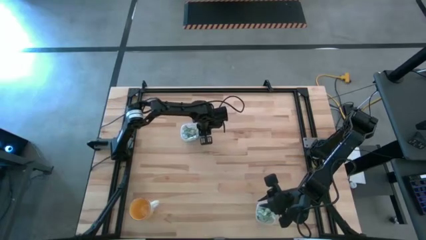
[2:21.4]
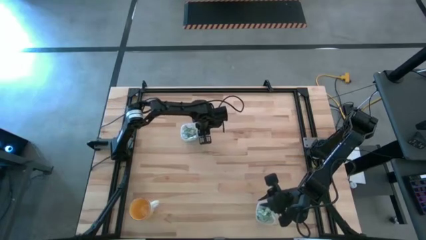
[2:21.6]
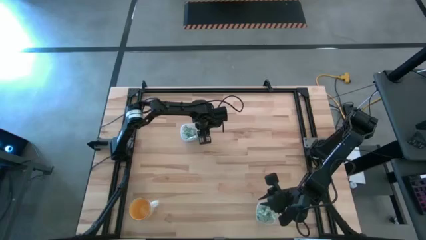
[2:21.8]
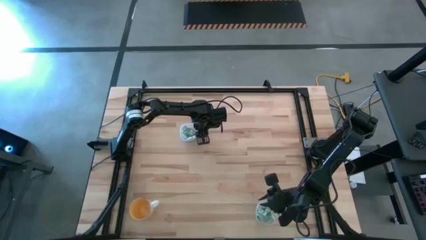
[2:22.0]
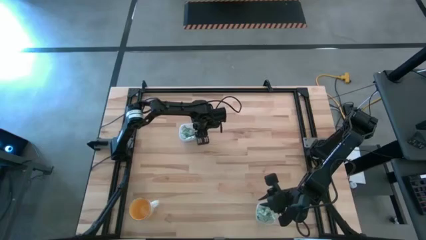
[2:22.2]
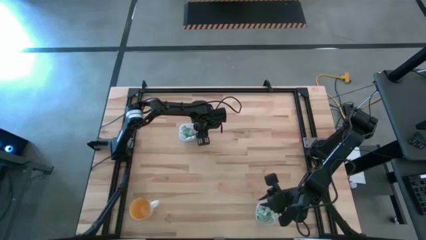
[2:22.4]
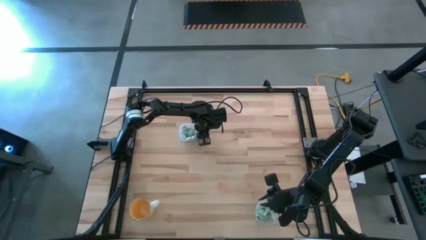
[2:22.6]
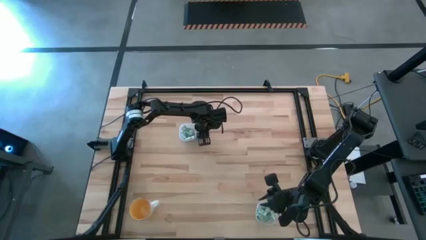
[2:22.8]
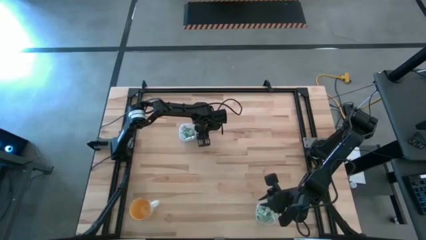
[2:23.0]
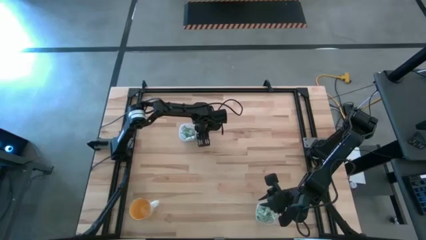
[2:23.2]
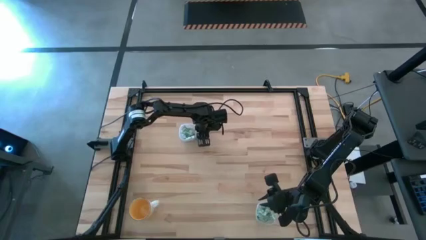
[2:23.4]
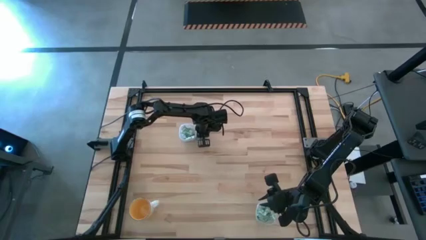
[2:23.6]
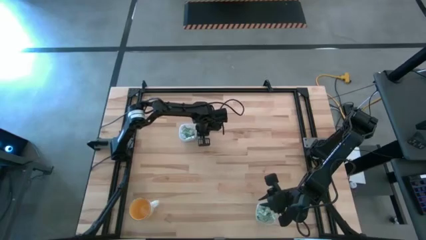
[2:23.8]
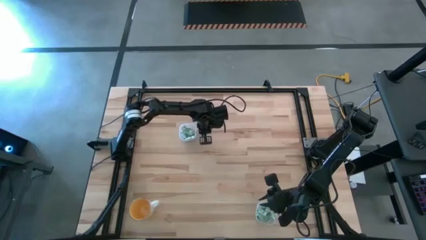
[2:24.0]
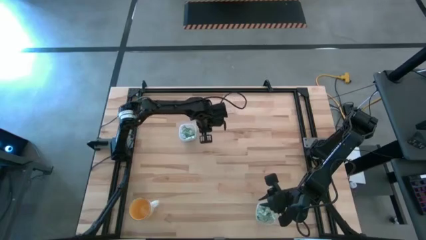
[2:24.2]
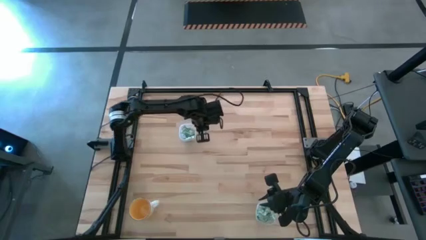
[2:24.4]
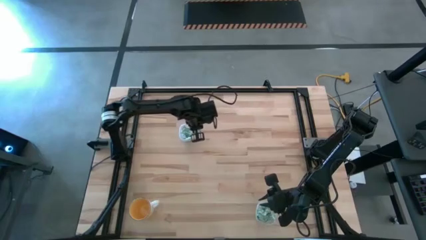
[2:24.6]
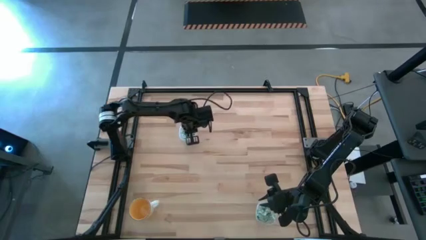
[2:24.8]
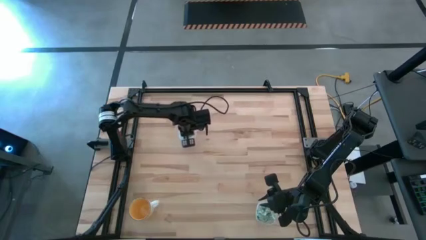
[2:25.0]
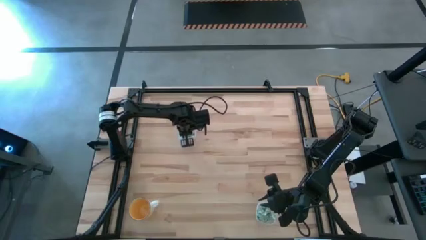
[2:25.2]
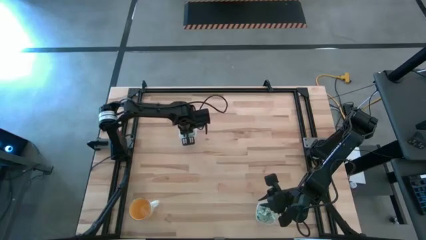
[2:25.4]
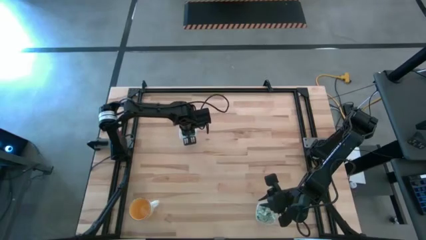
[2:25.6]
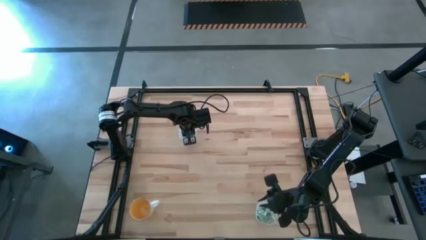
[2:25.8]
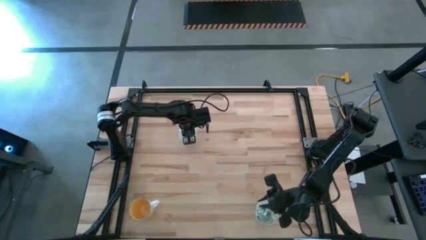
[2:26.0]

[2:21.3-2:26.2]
Task: Pick and place Stevia / Truvia into bins
Put the stevia packet into the top transparent container

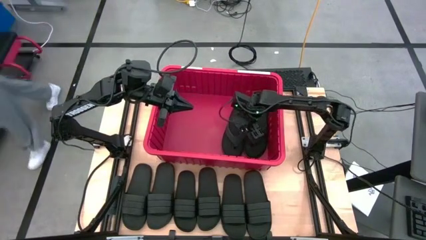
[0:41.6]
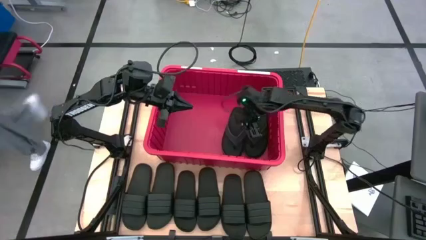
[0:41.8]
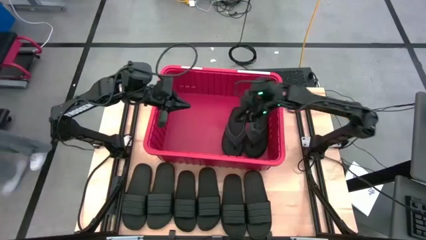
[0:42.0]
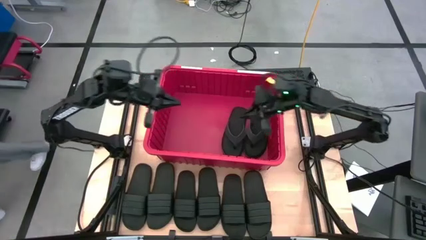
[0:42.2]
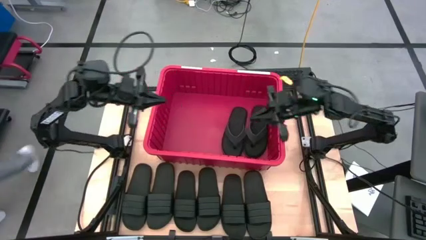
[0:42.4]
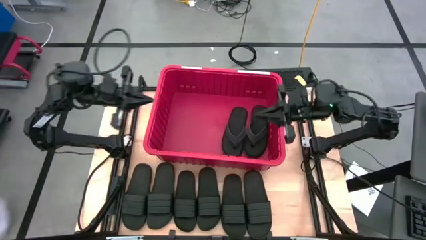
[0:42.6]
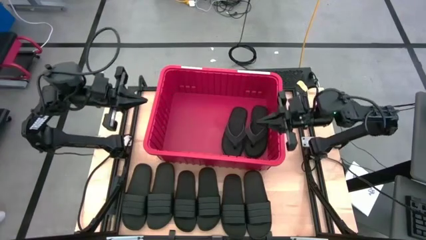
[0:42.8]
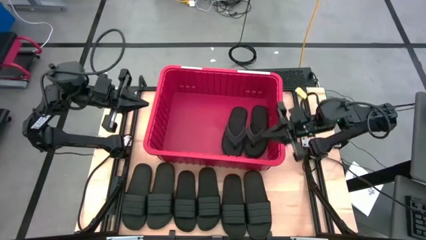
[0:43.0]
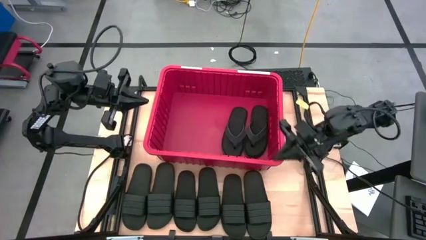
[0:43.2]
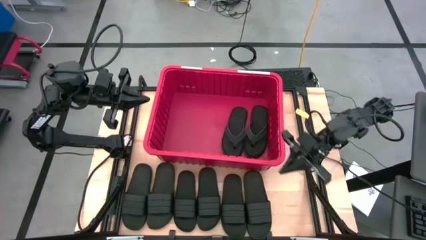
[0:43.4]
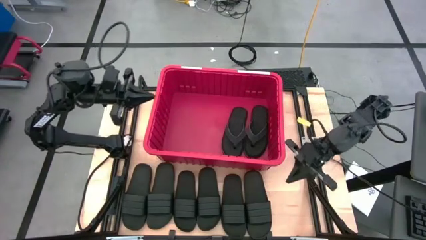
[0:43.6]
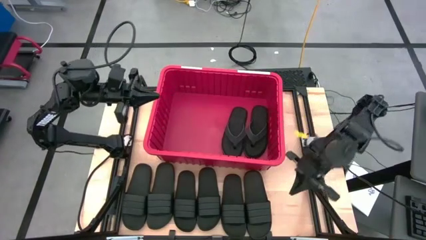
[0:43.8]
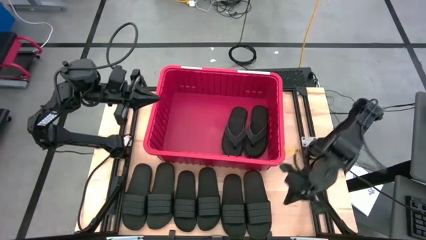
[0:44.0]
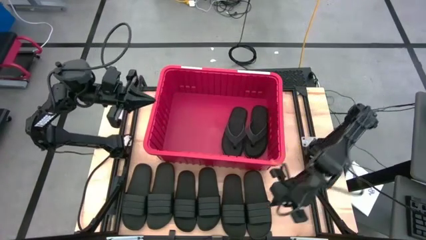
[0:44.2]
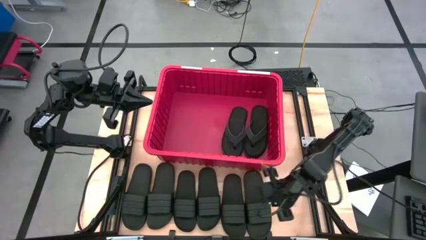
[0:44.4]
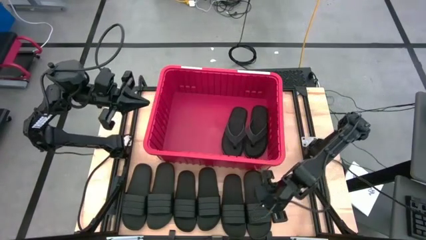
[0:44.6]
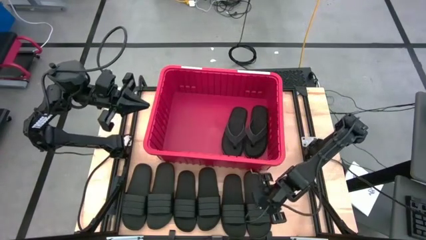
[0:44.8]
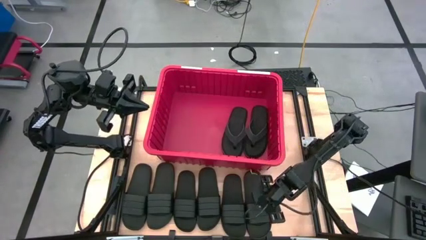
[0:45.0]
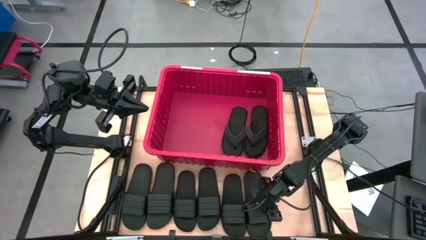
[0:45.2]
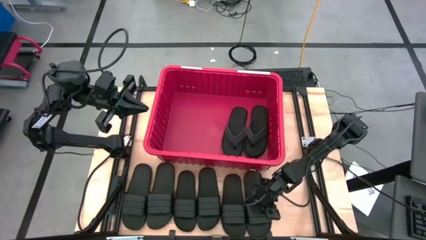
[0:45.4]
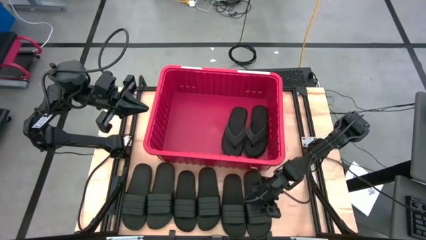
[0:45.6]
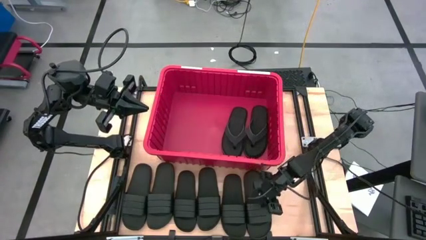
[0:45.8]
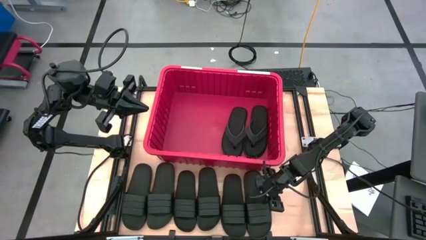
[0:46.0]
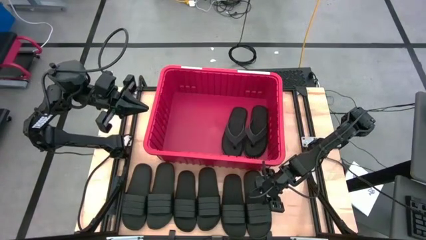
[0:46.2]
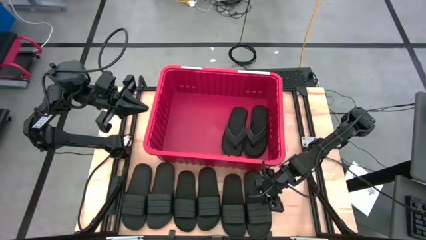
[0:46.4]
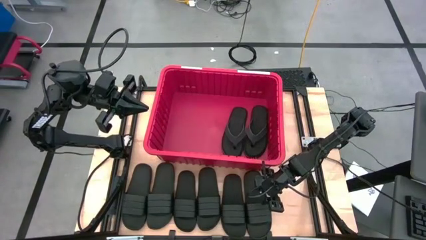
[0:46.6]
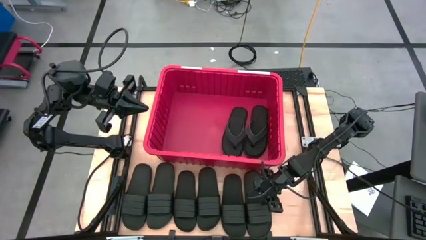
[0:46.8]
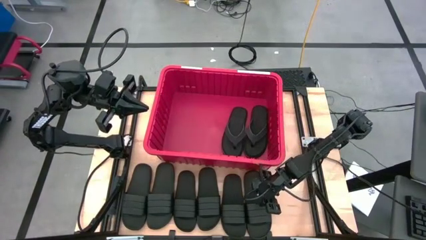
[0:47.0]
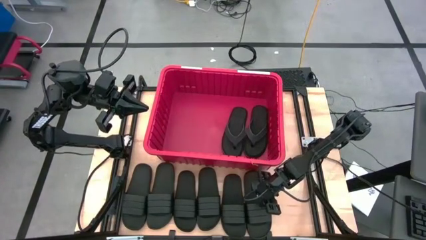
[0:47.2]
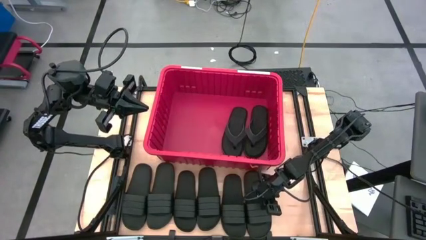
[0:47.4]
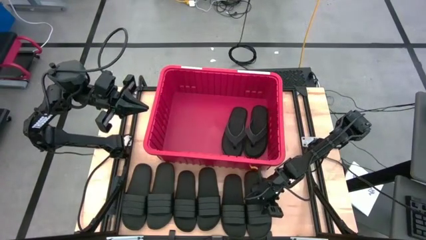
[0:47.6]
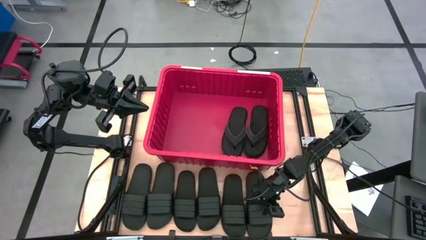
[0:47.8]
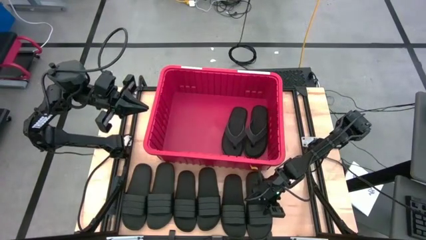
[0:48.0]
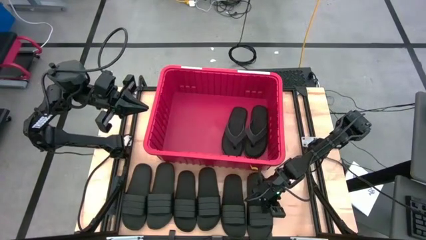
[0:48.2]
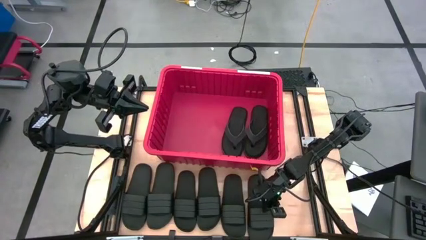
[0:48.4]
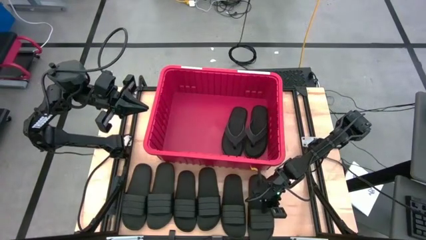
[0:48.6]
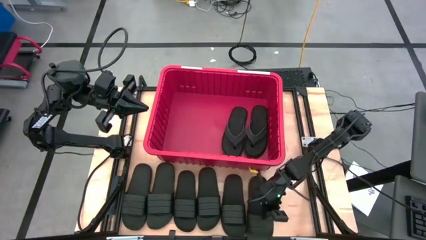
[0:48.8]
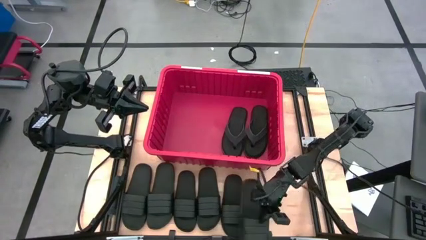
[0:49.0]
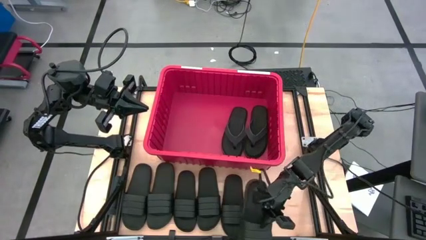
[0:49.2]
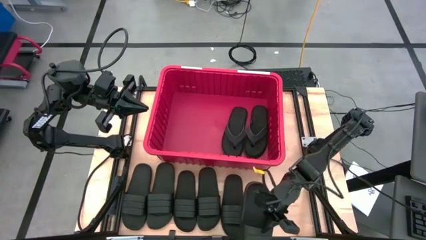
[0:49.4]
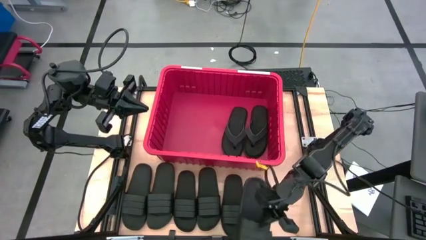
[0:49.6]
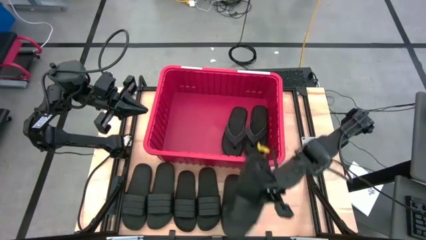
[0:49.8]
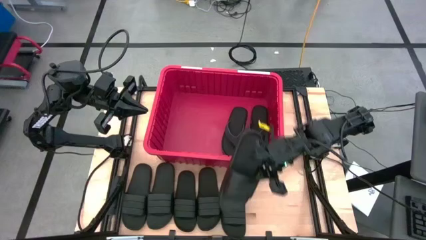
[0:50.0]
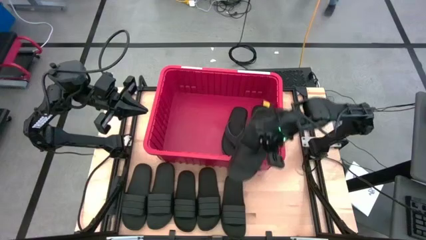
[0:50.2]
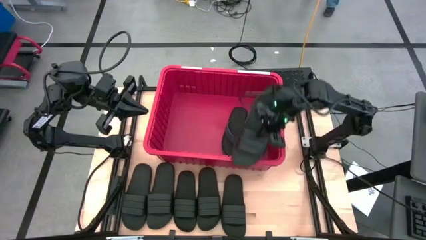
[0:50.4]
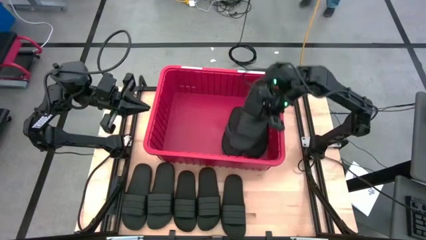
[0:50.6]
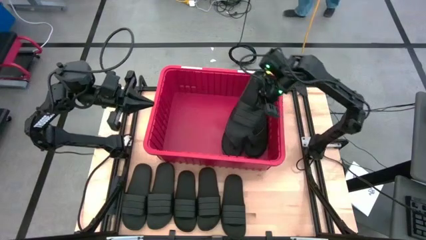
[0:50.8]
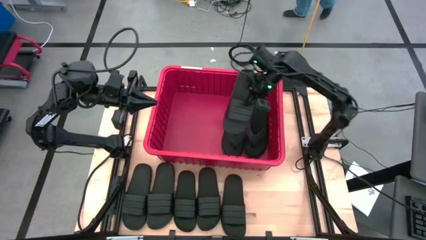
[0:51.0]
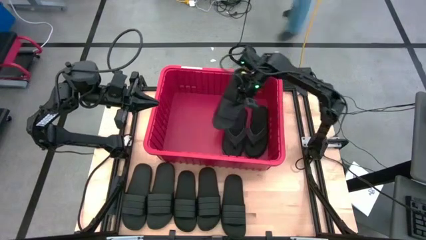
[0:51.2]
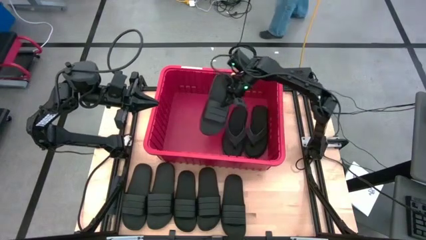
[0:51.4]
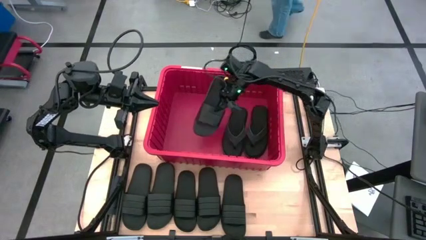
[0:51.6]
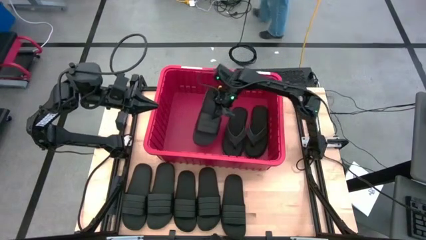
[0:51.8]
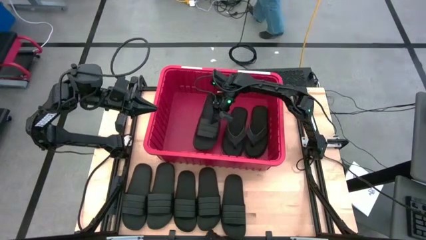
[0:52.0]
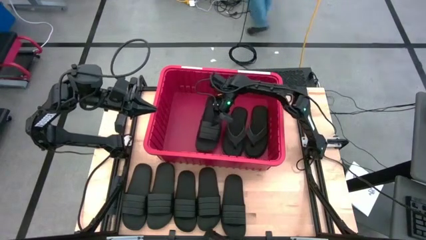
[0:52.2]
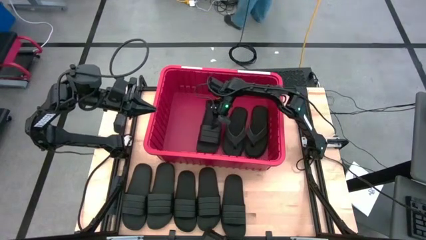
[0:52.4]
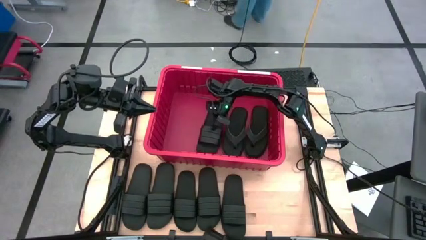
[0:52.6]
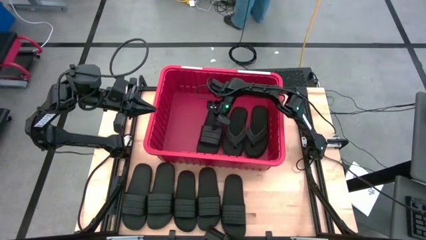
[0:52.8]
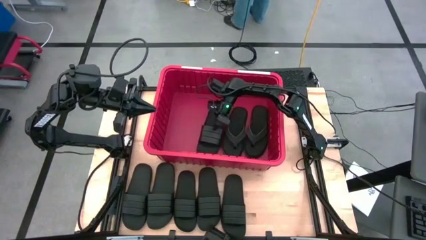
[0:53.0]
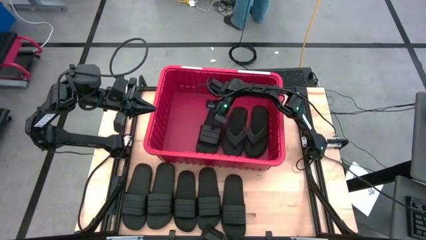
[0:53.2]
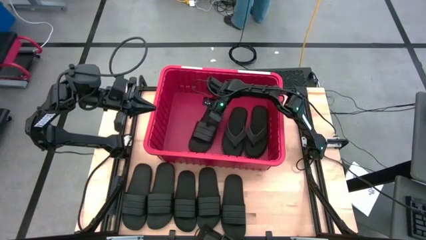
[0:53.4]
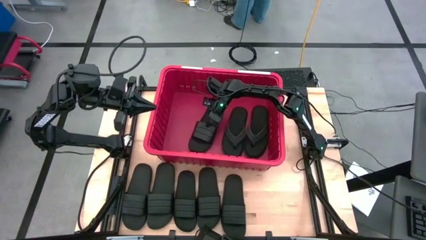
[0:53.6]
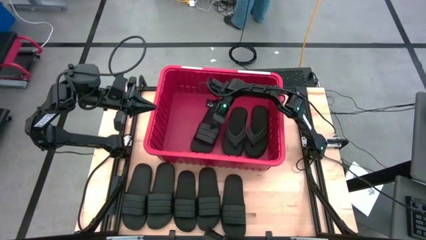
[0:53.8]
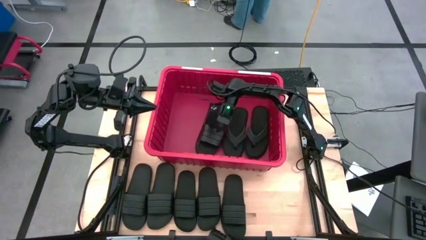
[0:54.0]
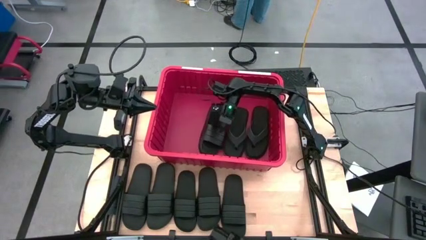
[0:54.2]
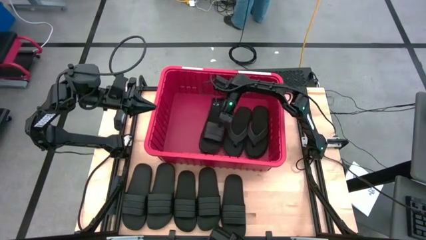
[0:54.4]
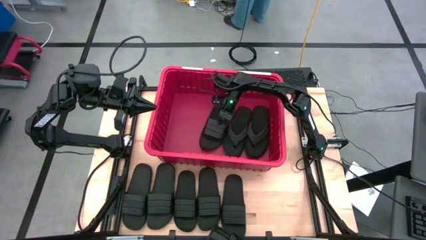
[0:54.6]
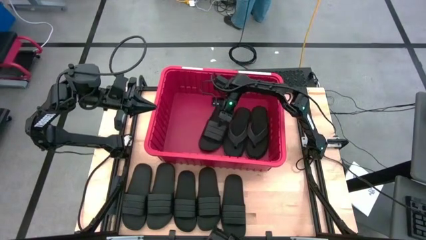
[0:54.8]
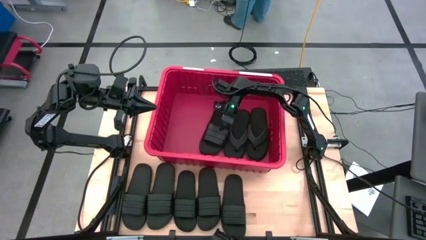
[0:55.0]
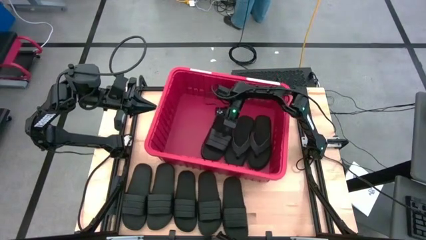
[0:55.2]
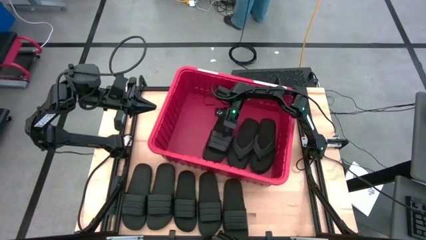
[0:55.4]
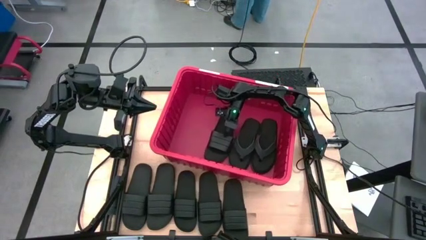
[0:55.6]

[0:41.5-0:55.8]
Task: Pick and place slides into bin
Put the black slide into the red bin
